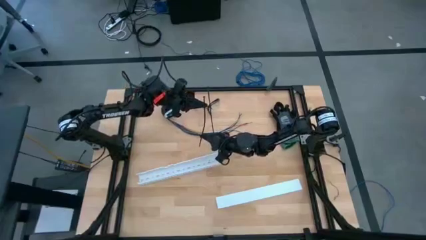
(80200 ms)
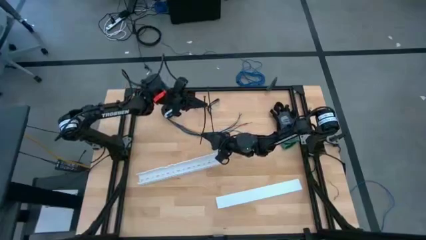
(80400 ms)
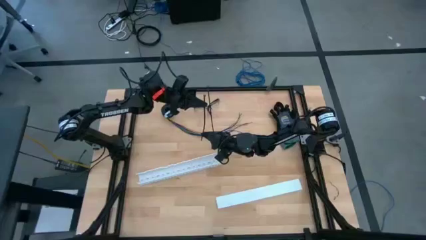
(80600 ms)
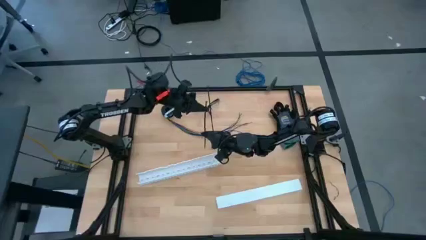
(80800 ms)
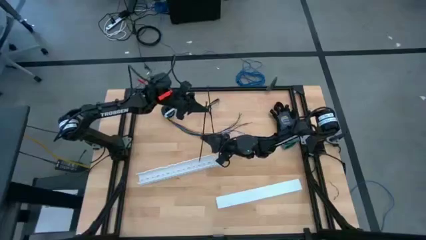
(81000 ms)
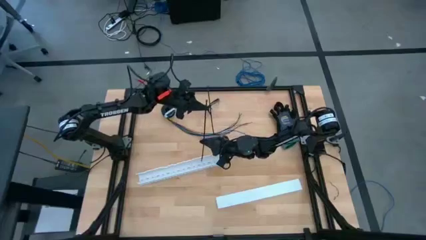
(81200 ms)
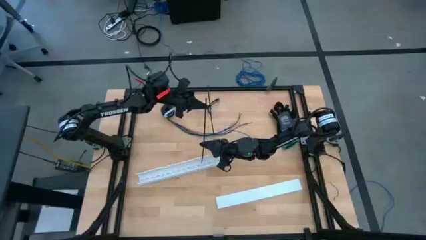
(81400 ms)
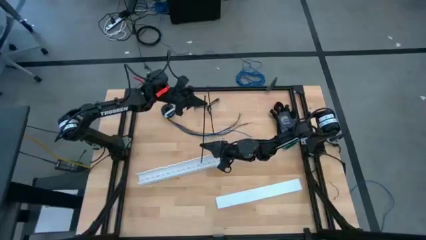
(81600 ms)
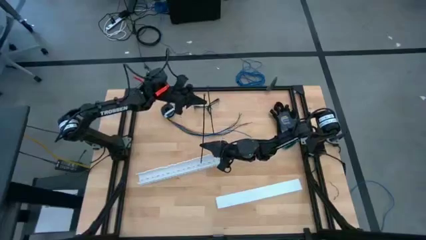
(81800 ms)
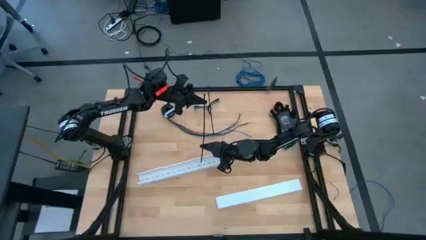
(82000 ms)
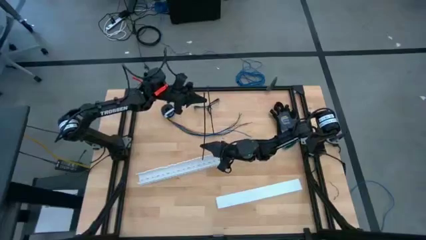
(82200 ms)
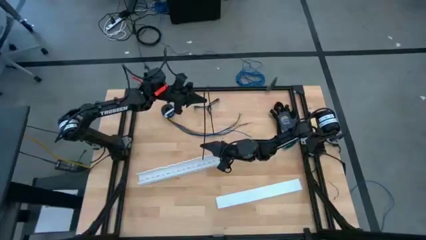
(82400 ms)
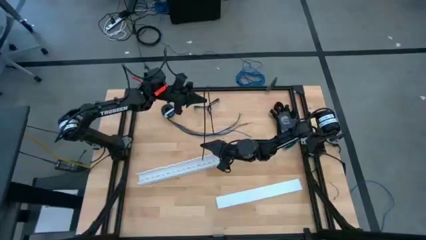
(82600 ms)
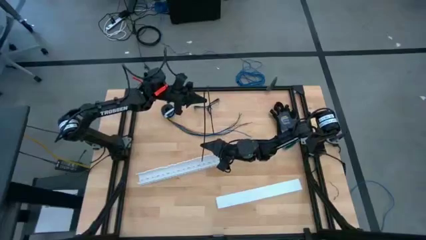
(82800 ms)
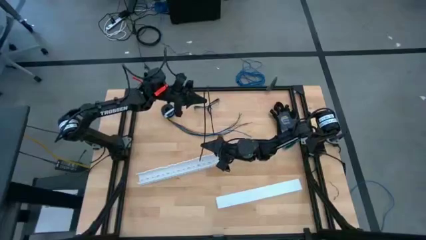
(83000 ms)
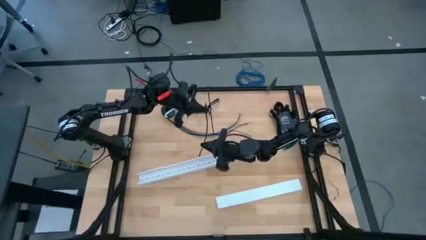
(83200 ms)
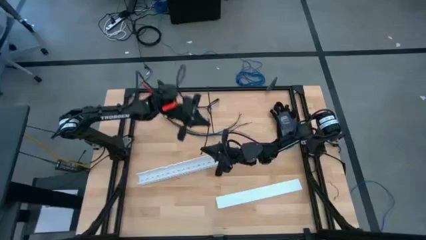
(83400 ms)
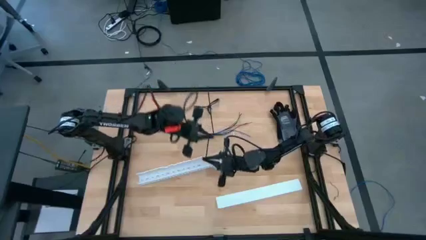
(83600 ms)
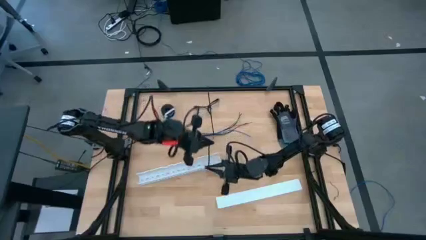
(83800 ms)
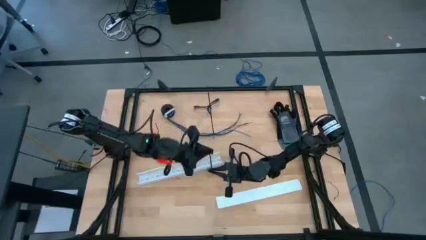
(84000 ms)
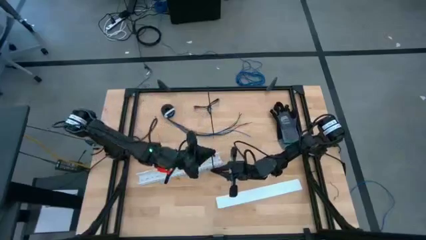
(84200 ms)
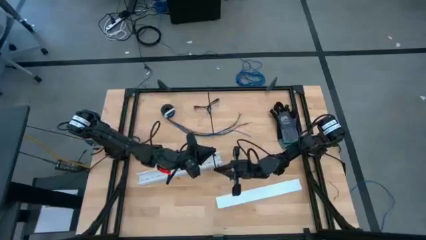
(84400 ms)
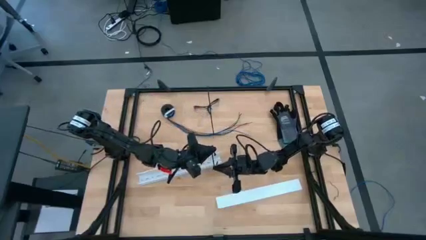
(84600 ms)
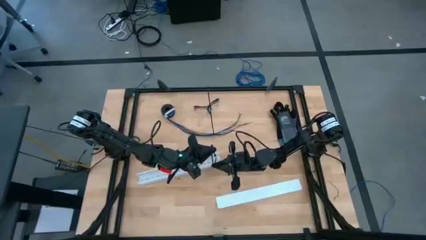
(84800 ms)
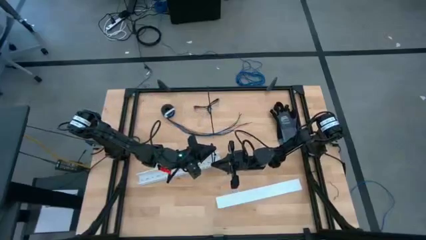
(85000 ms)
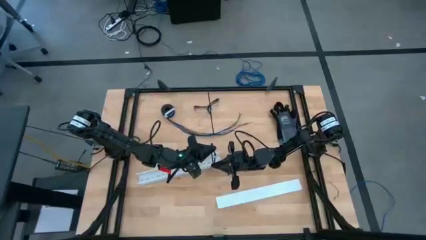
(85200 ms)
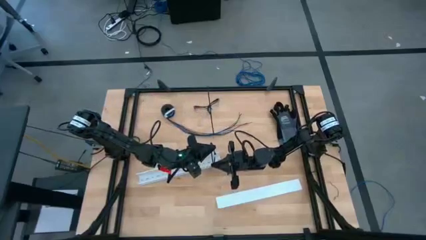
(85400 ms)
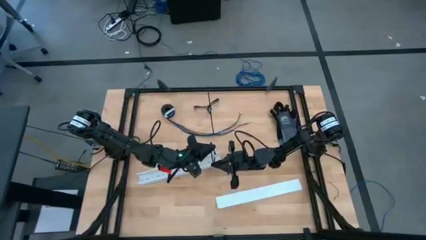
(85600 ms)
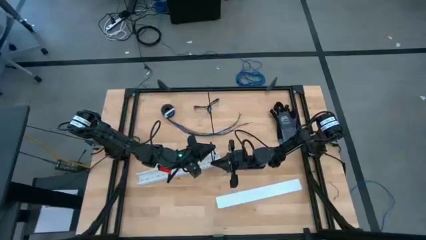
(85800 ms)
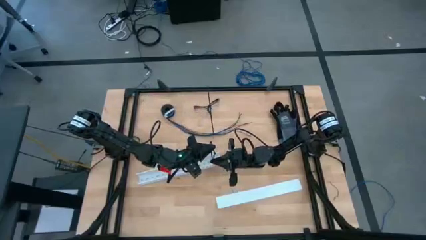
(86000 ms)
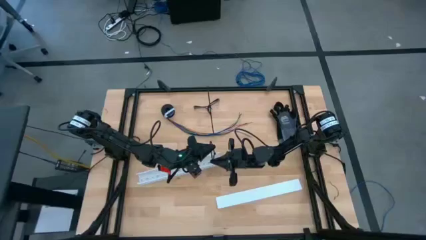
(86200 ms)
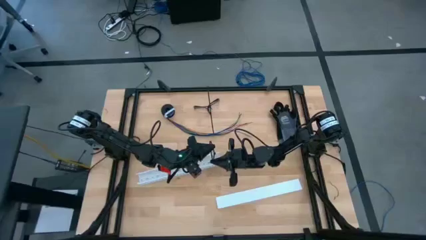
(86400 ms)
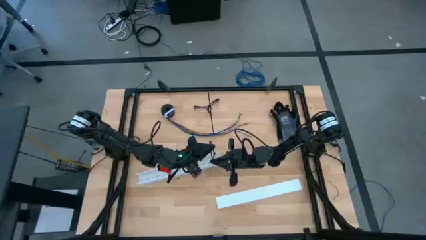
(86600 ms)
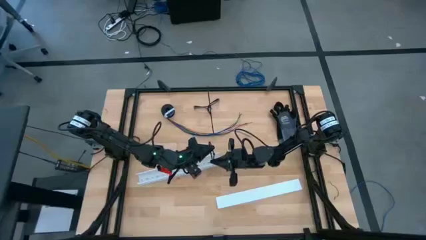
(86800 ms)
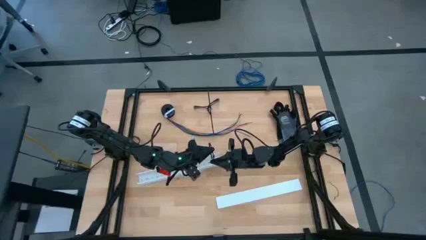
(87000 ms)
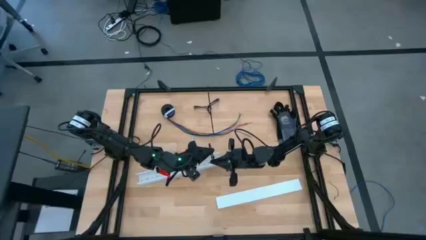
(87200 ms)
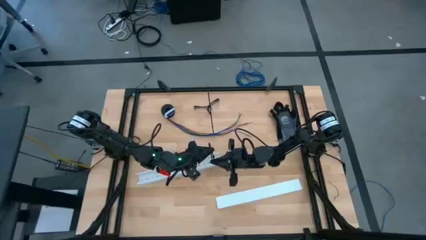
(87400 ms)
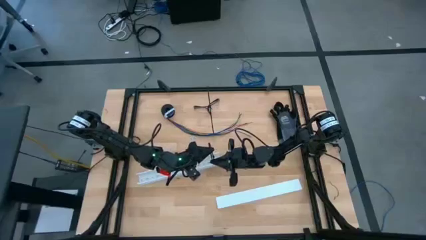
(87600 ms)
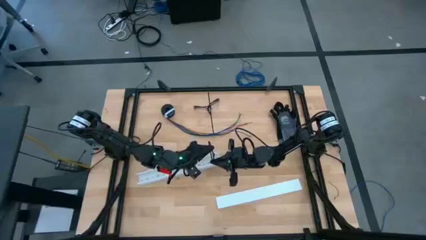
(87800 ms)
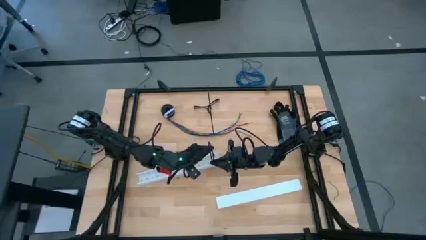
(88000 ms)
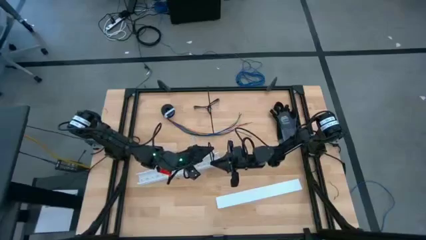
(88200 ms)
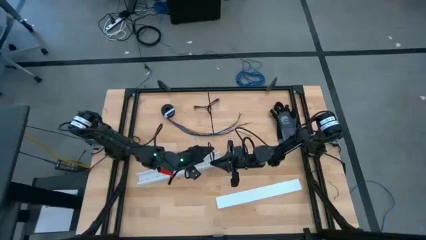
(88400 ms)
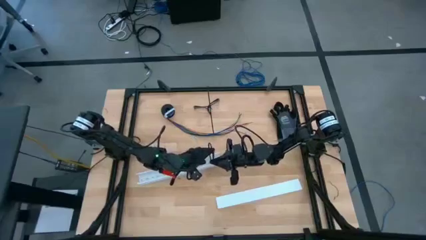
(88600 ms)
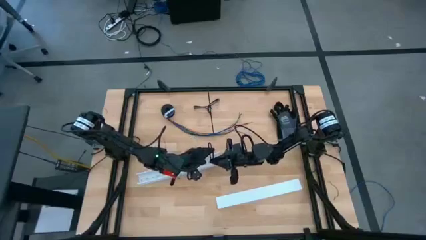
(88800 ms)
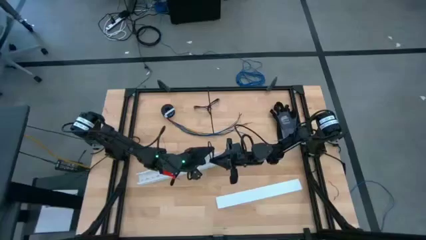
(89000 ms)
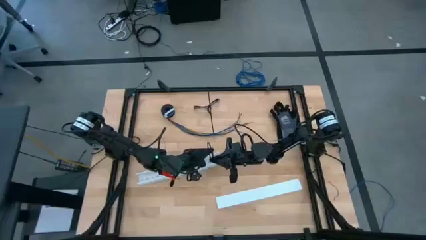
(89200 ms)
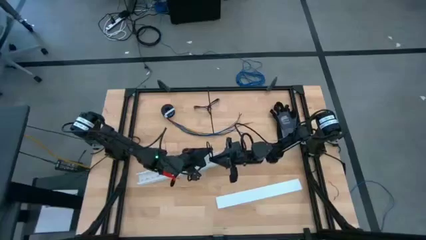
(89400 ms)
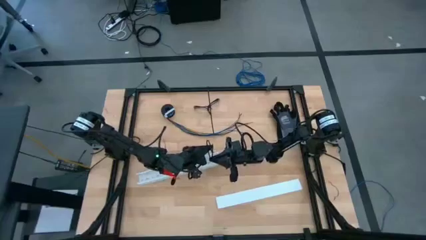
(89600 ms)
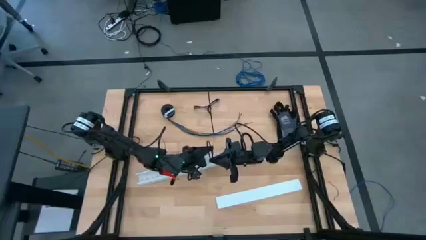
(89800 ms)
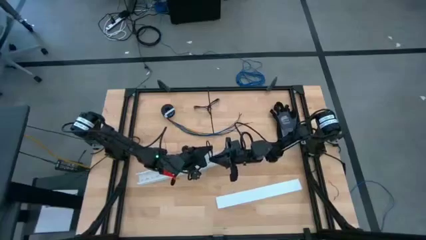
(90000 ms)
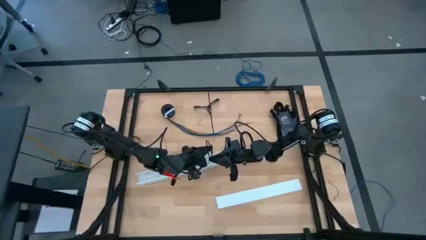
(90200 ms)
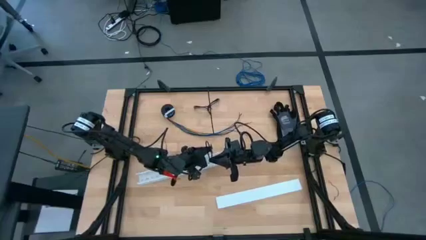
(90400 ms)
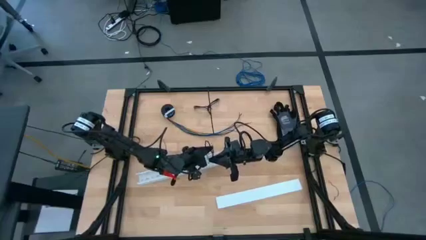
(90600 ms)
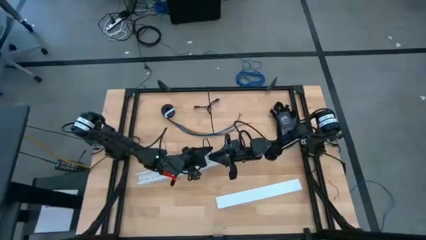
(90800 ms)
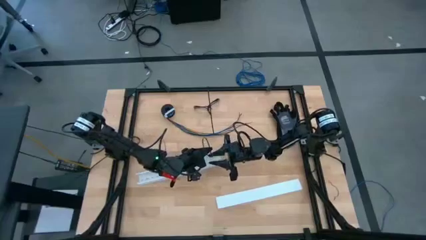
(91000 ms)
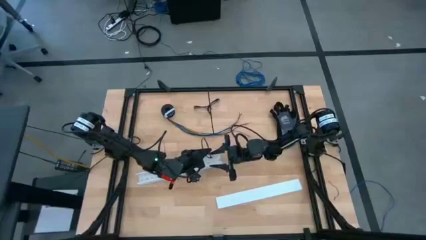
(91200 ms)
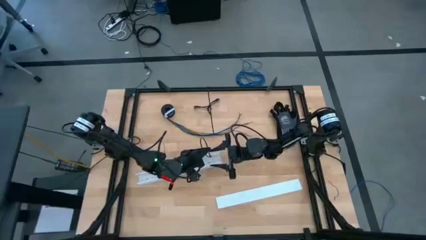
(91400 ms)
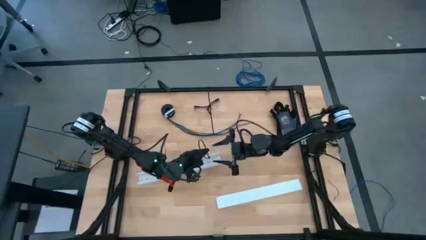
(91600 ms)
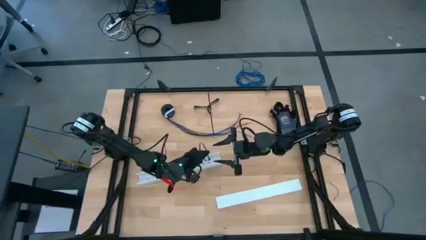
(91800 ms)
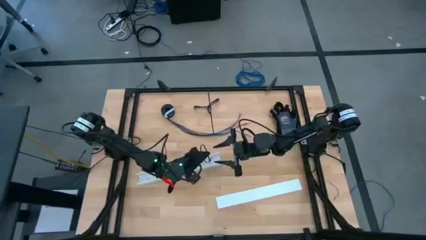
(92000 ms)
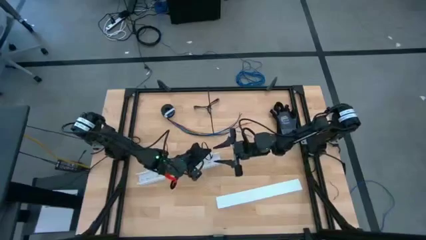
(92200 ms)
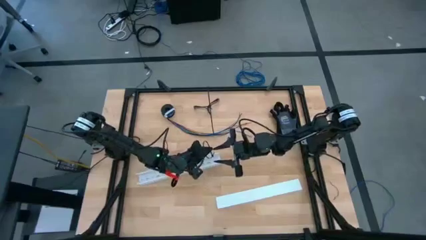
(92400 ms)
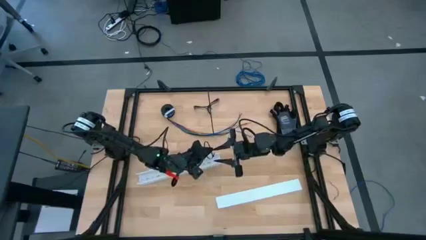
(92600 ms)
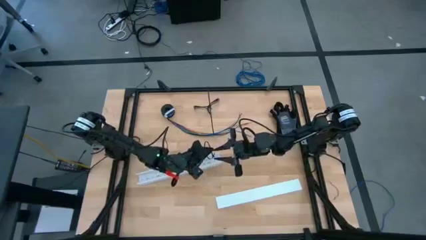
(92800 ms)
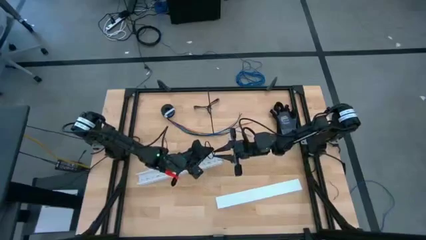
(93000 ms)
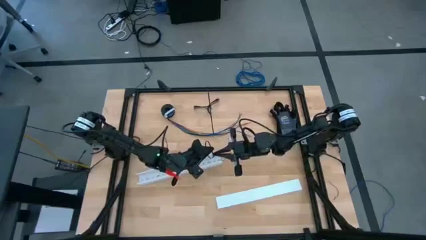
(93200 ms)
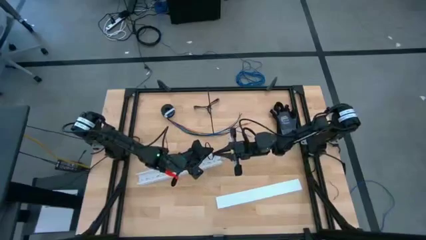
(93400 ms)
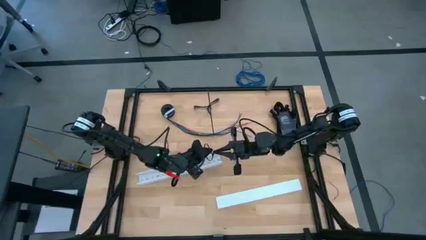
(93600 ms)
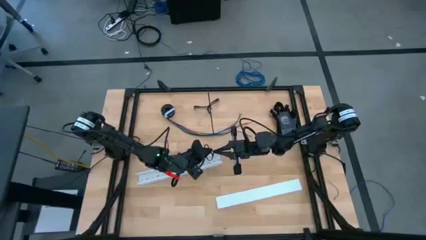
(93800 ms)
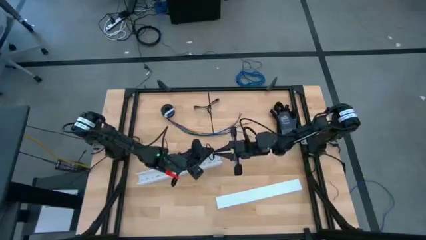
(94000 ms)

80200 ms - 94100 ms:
Task: Ziptie cables
Insert the black zip tie into the locking head
